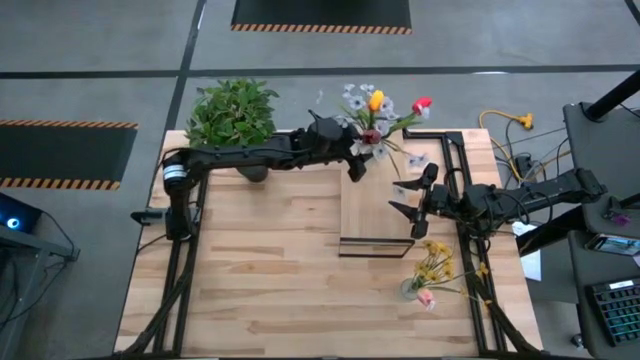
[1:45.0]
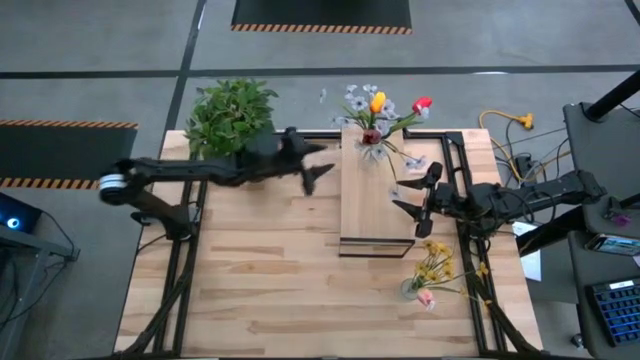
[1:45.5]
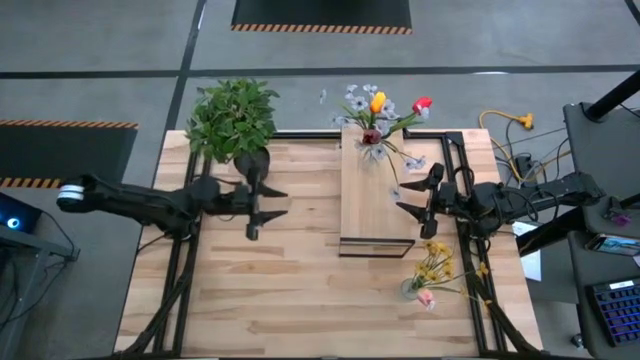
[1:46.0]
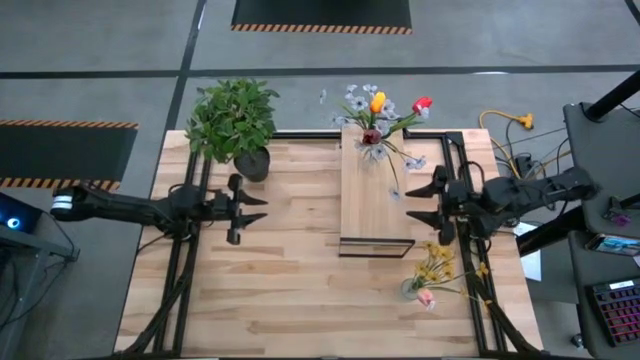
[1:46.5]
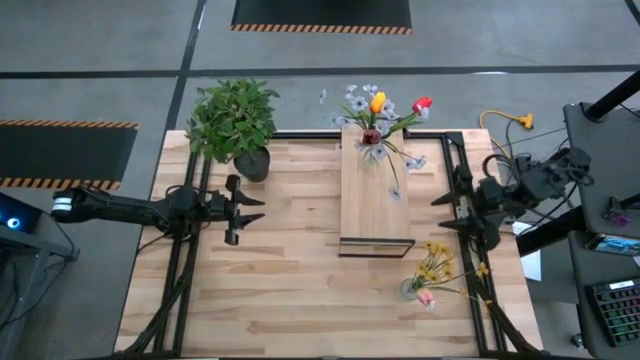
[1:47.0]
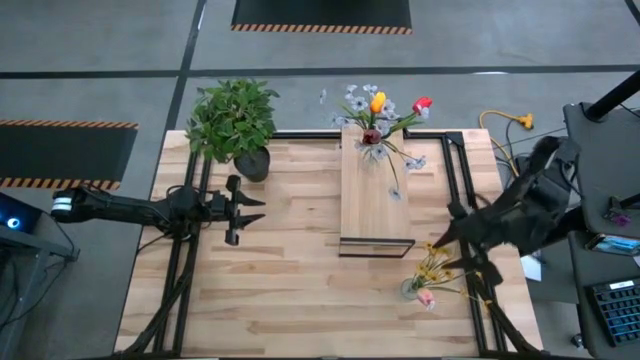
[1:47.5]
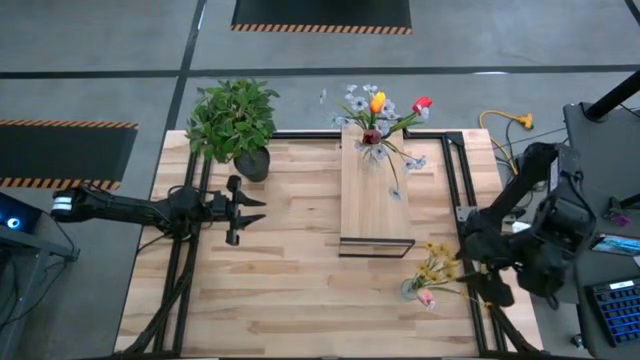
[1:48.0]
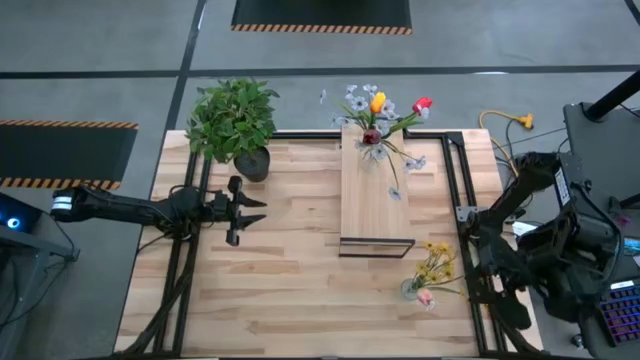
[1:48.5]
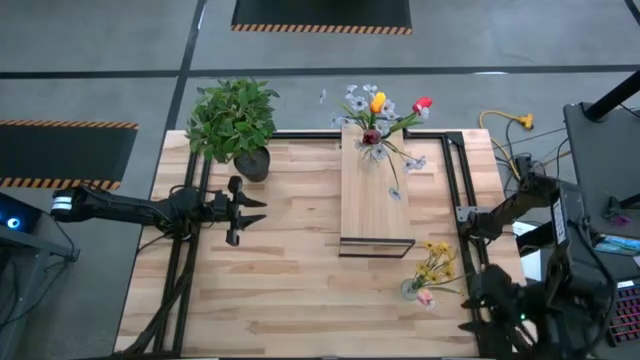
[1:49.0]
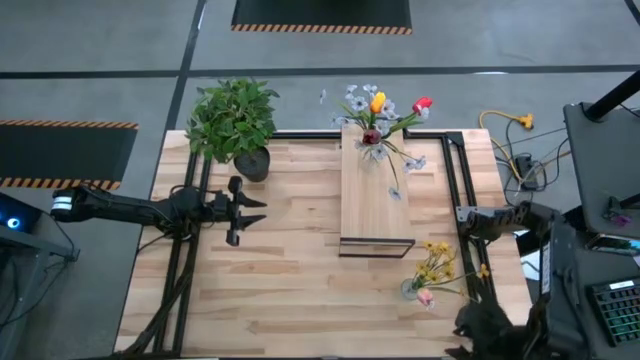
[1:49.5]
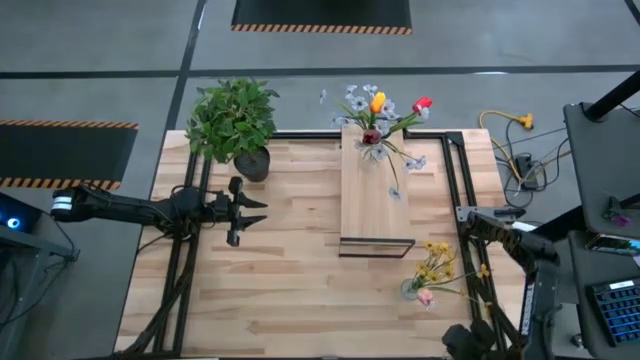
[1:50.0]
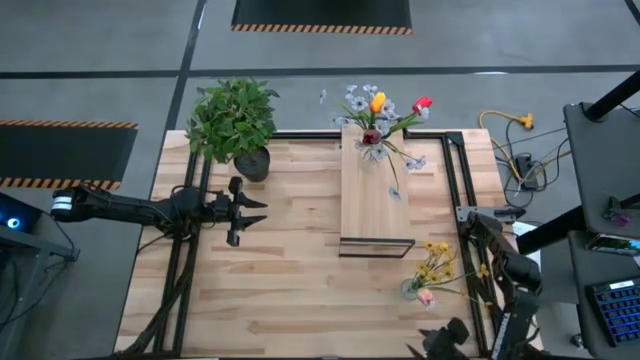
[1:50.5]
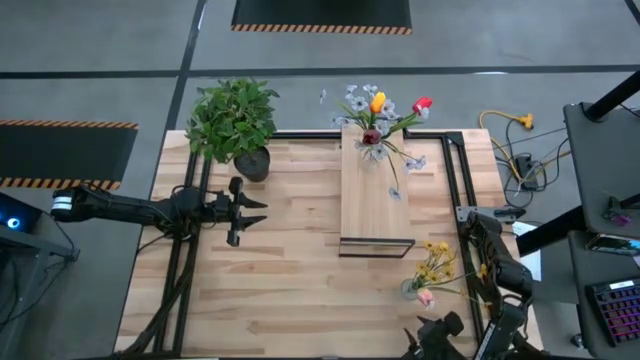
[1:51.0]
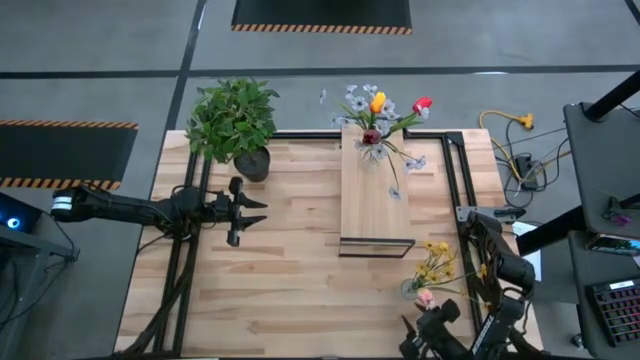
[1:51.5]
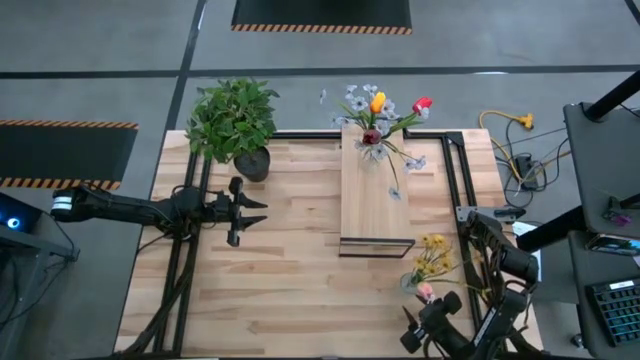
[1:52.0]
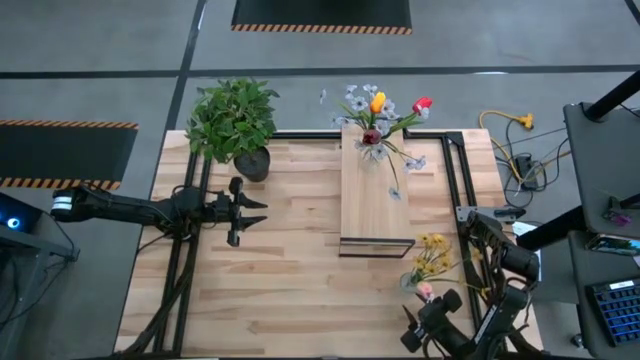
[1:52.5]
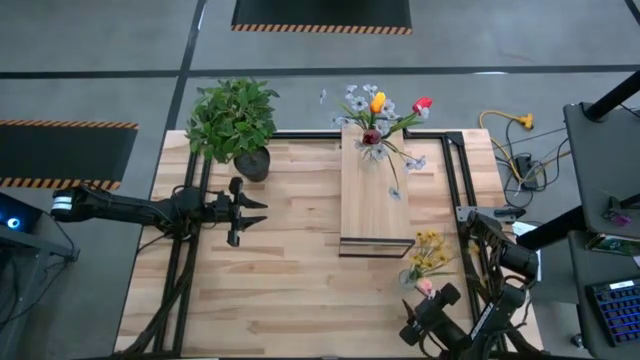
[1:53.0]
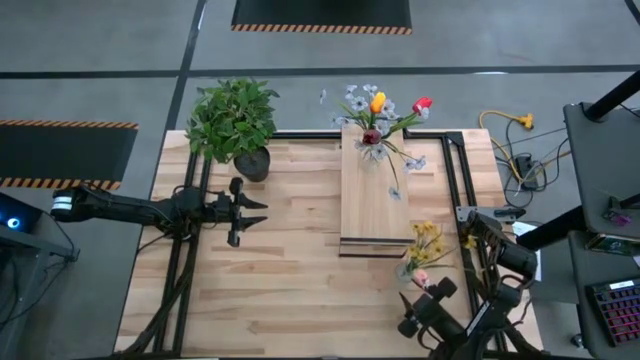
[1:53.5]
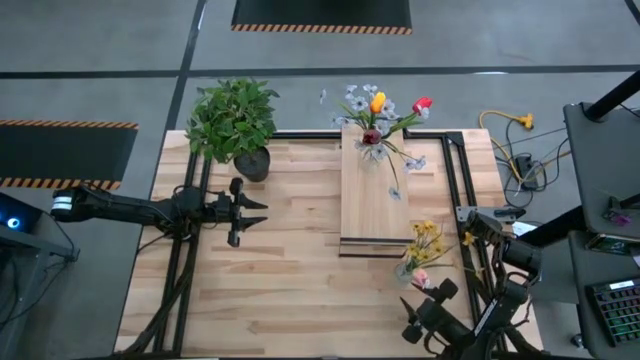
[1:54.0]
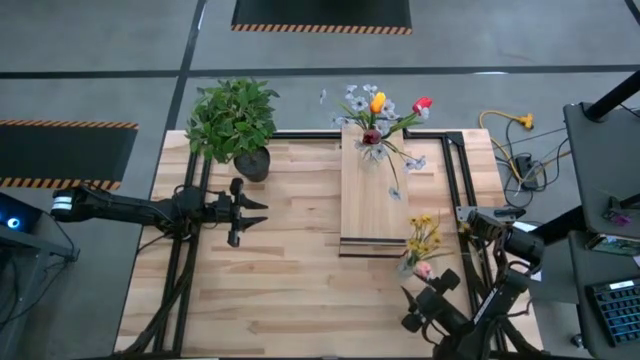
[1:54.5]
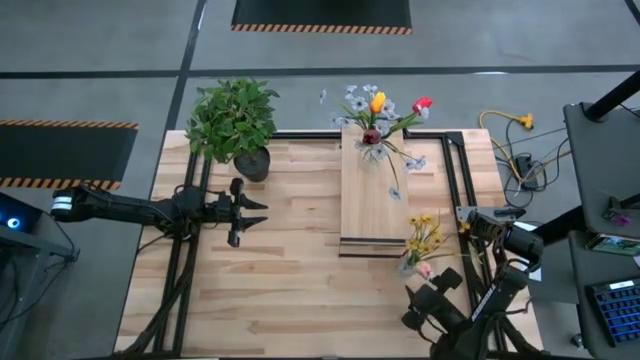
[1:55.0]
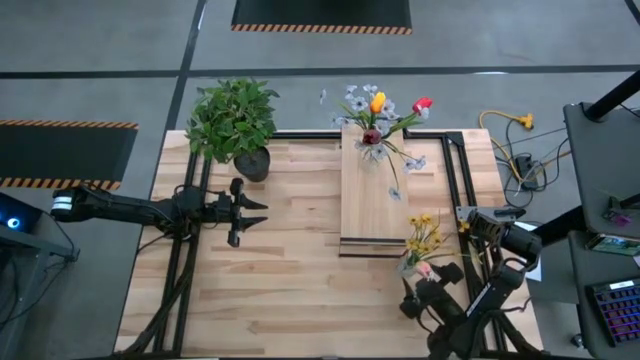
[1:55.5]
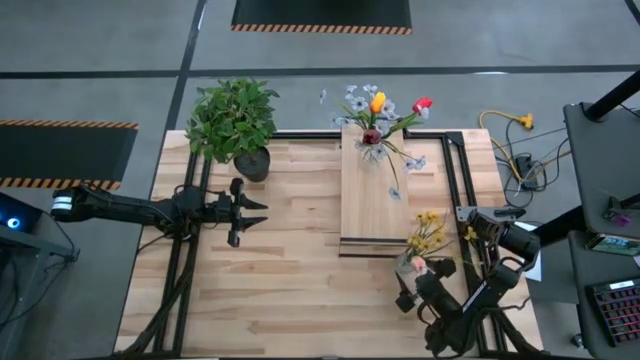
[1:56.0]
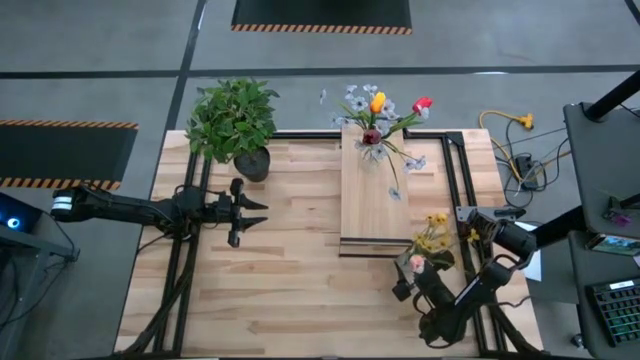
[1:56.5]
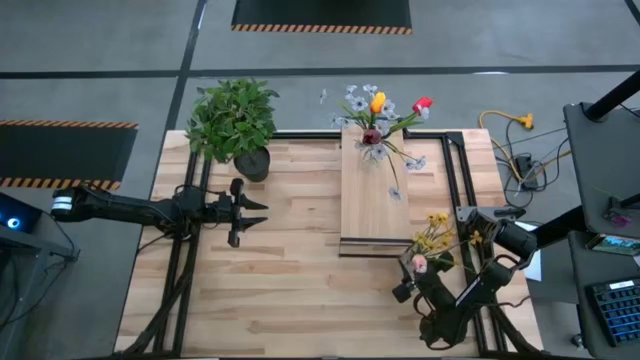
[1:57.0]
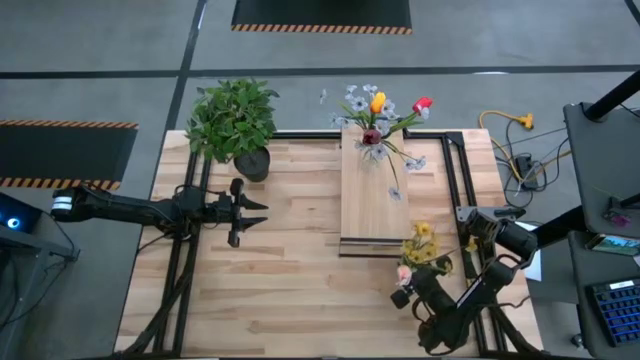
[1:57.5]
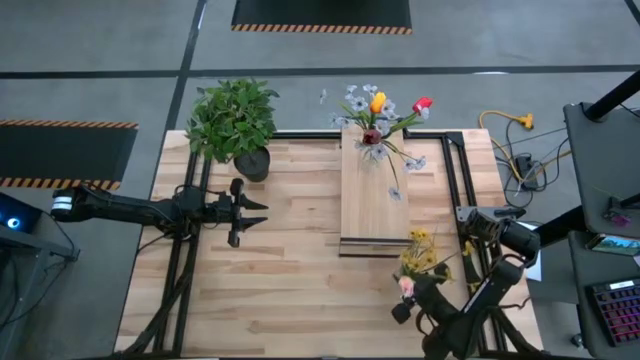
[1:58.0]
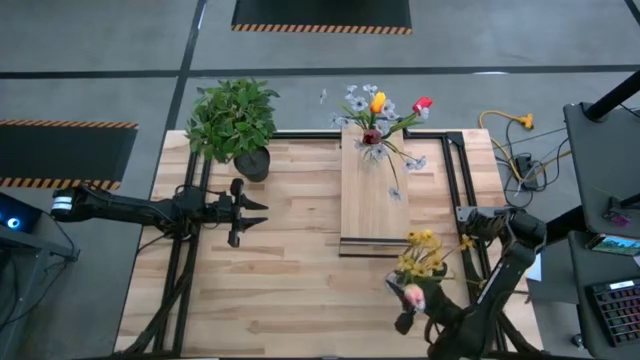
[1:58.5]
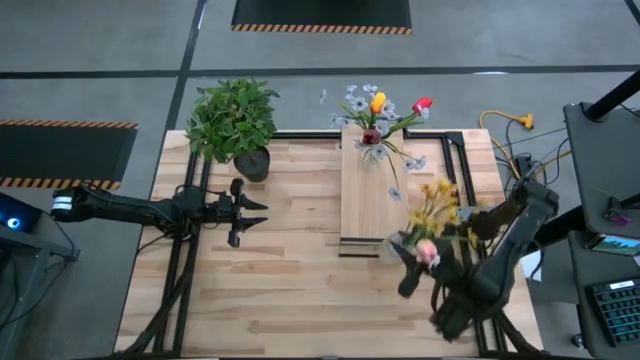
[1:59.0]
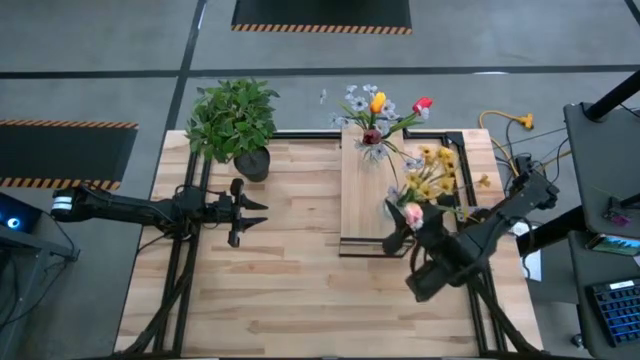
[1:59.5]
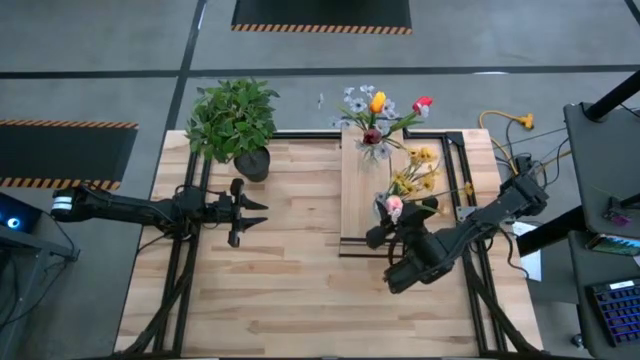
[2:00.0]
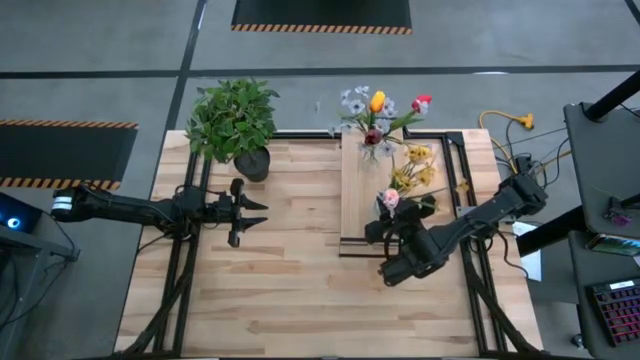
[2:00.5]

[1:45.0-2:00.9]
Task: Pick and place flowers into a vace then onto a shelf
Put the transparent vase with tulip and flowers on the shelf

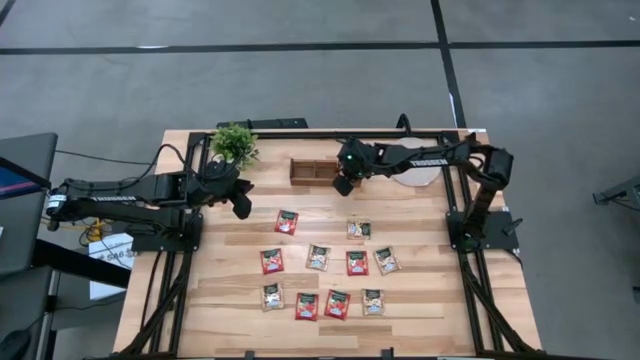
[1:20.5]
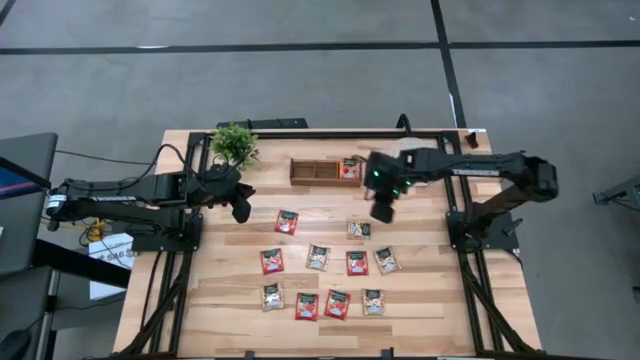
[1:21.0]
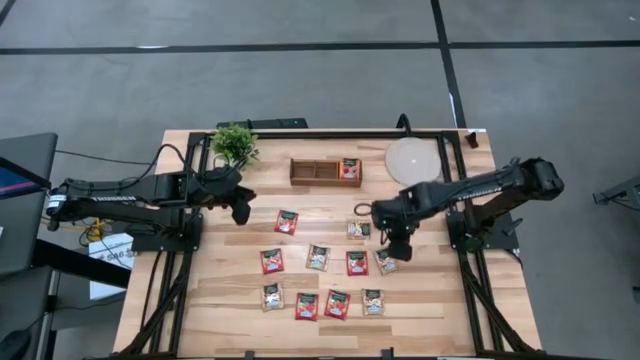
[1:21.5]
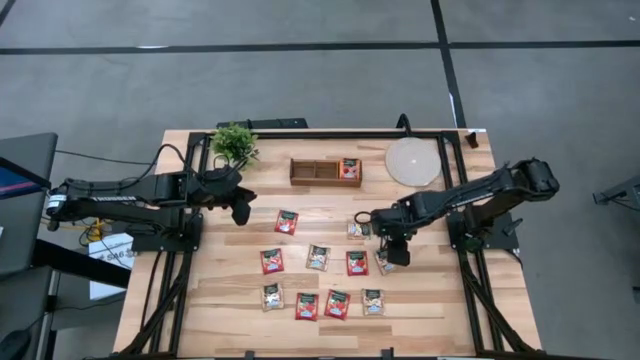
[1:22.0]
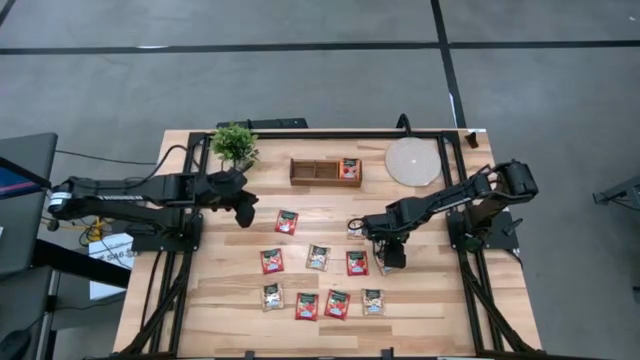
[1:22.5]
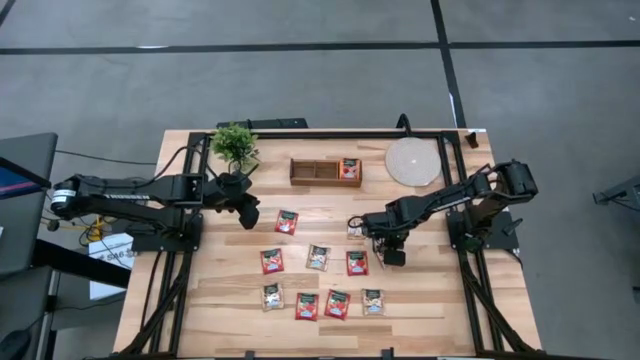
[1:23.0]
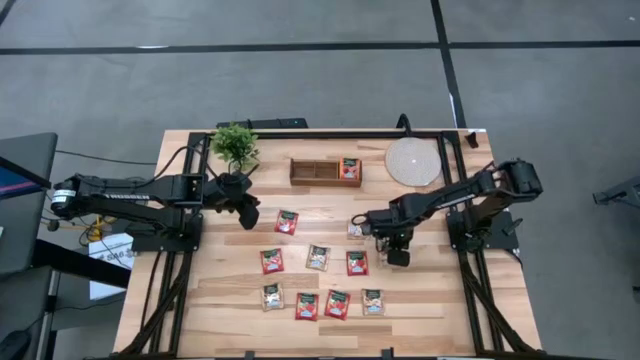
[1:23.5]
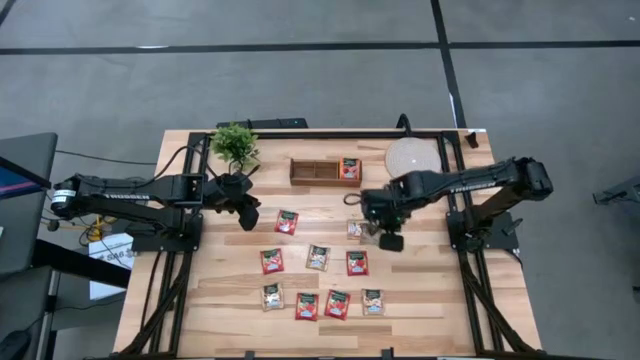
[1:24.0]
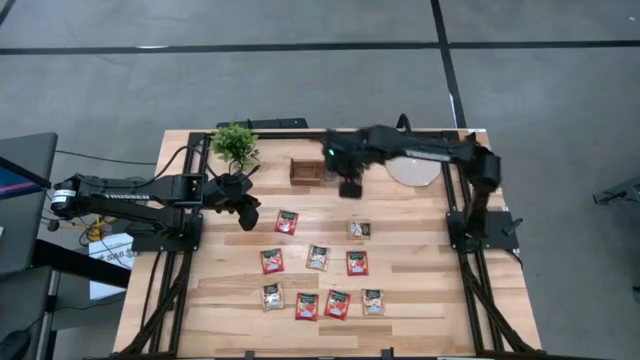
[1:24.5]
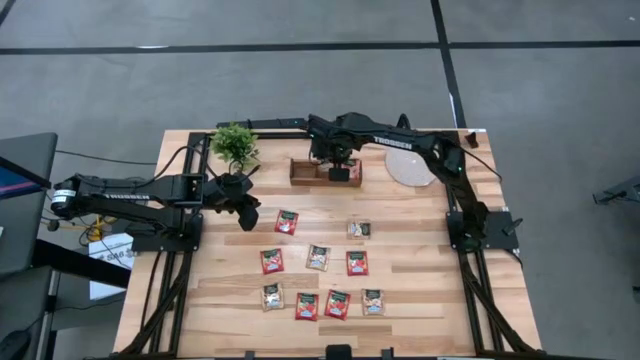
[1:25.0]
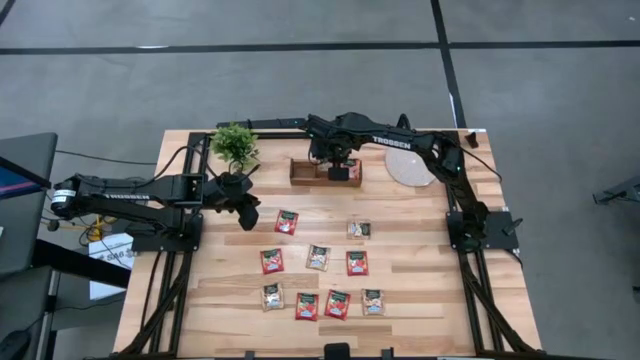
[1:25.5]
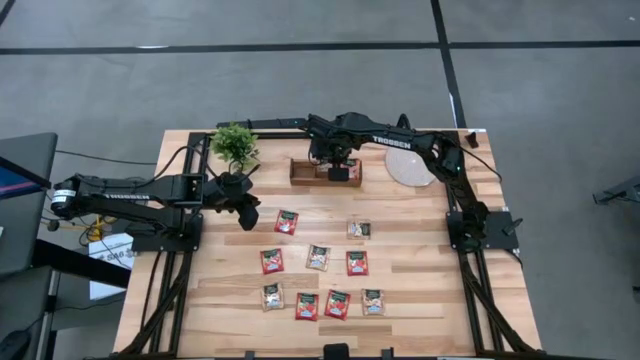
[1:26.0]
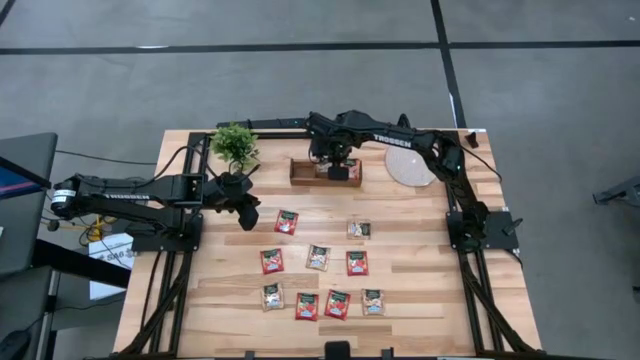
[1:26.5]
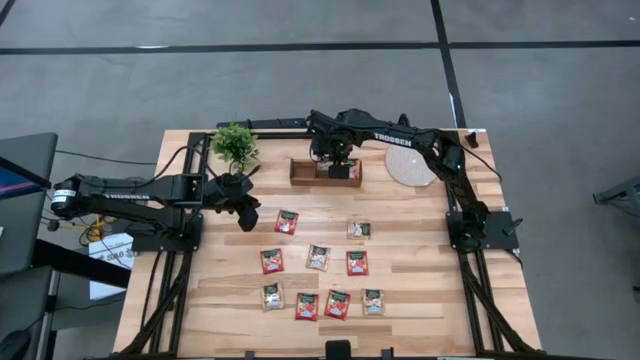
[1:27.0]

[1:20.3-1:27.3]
Task: Pick & Place Tea
Put the brown tea bag into the middle section of the wooden organizer
